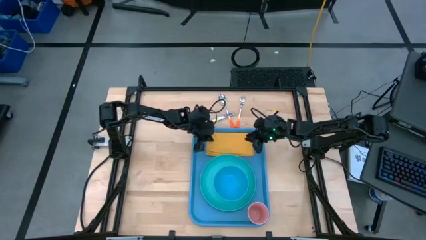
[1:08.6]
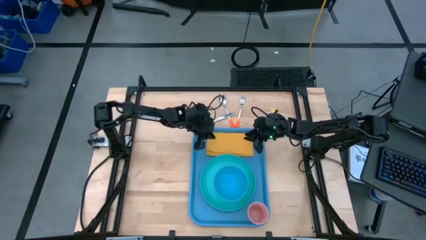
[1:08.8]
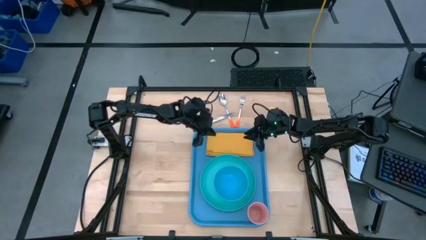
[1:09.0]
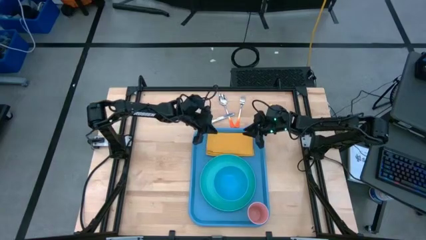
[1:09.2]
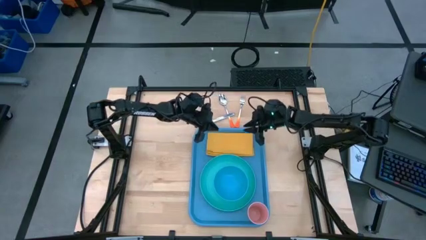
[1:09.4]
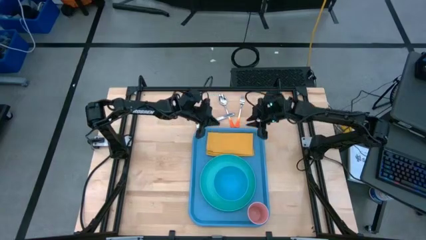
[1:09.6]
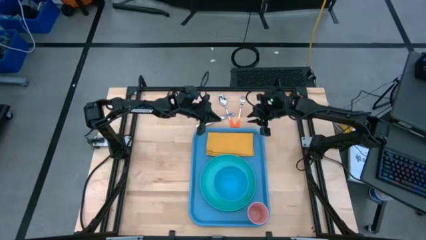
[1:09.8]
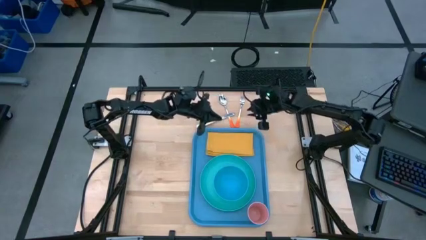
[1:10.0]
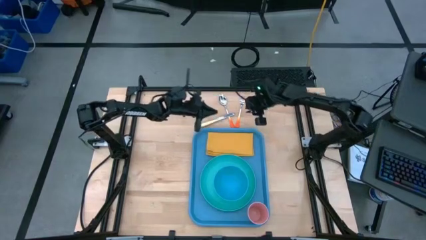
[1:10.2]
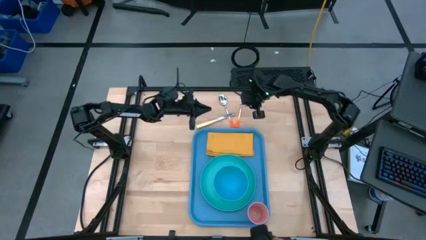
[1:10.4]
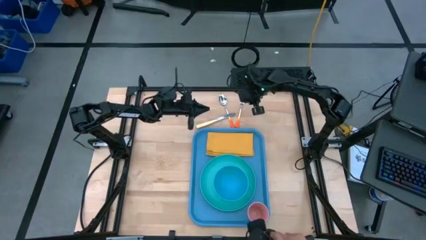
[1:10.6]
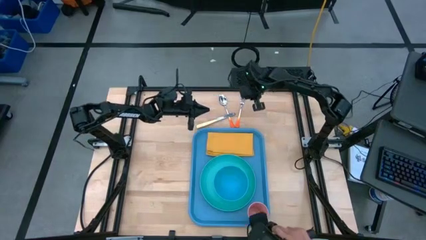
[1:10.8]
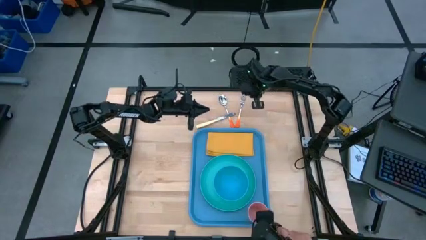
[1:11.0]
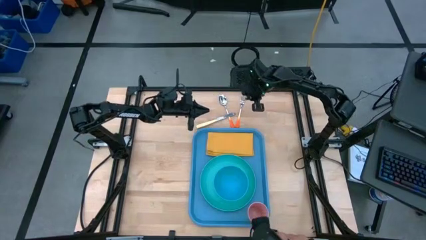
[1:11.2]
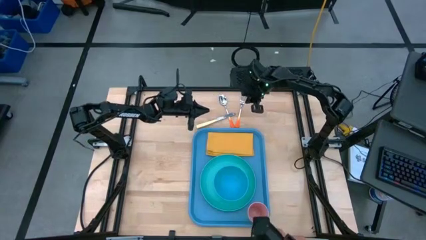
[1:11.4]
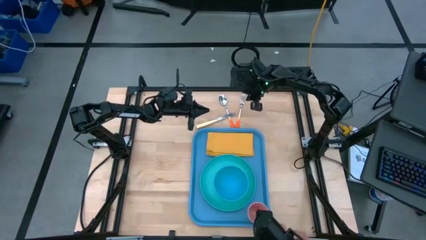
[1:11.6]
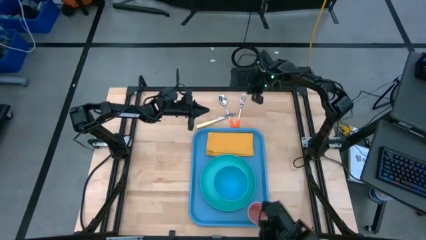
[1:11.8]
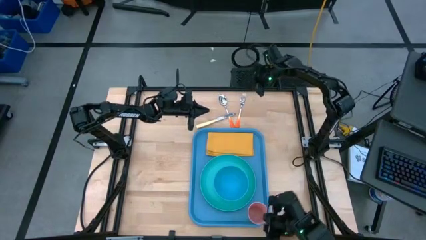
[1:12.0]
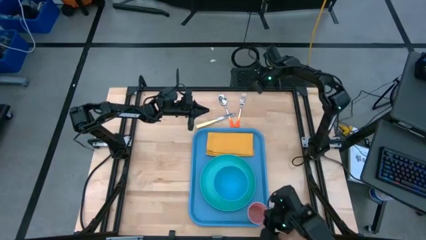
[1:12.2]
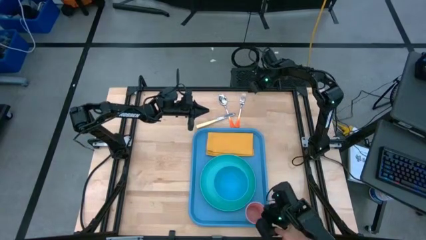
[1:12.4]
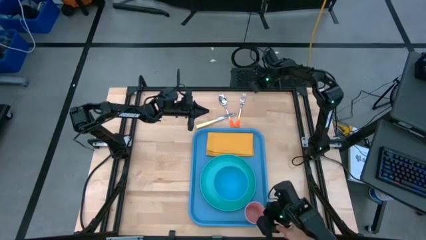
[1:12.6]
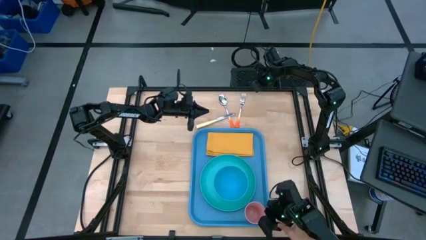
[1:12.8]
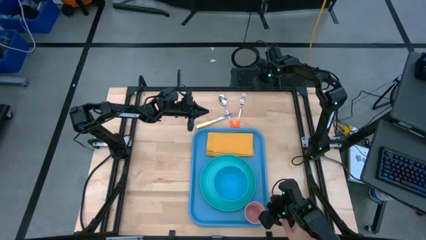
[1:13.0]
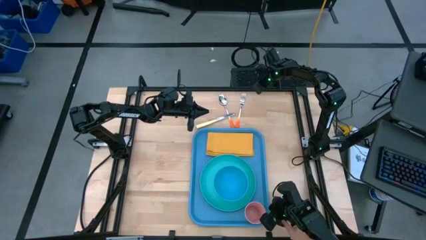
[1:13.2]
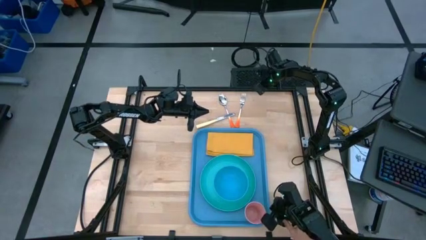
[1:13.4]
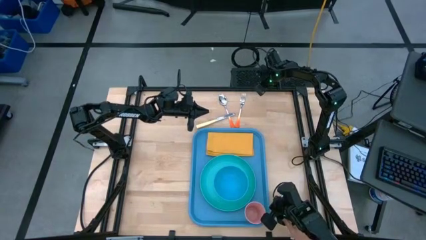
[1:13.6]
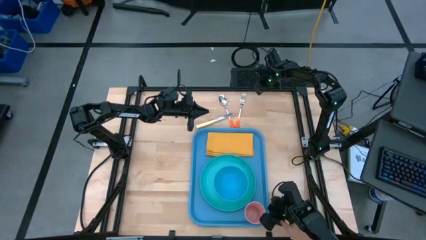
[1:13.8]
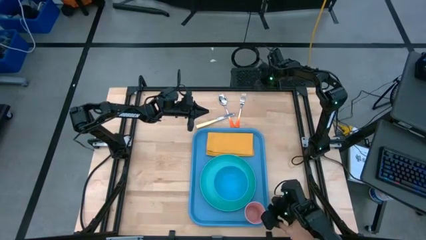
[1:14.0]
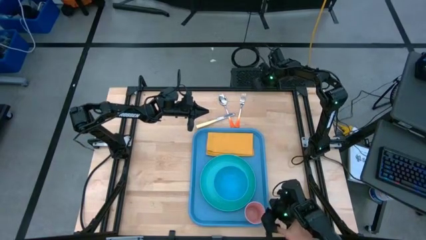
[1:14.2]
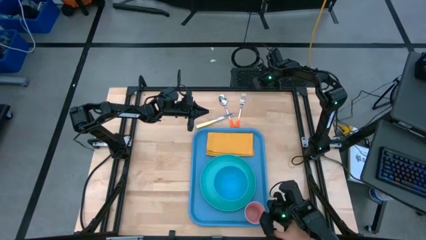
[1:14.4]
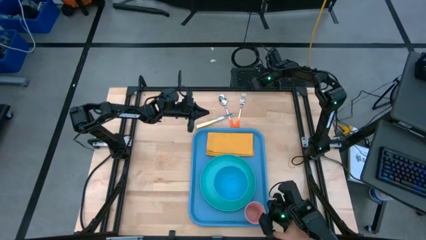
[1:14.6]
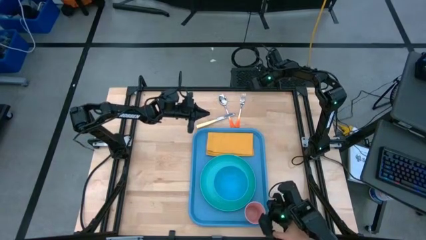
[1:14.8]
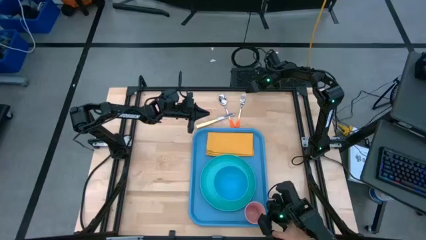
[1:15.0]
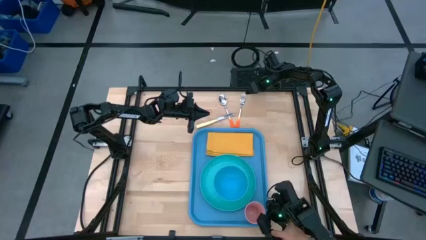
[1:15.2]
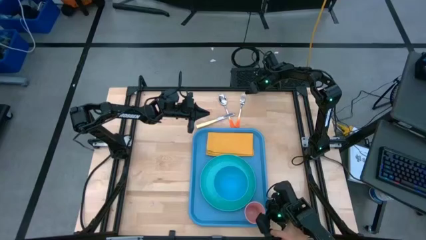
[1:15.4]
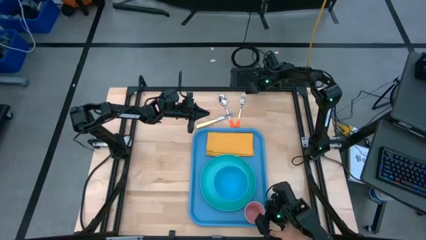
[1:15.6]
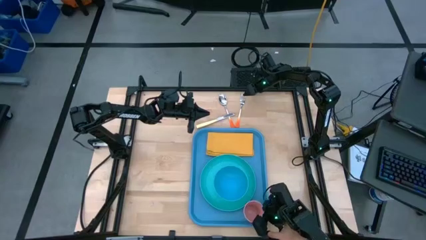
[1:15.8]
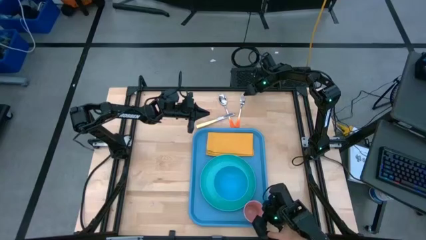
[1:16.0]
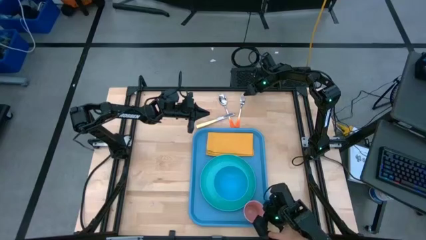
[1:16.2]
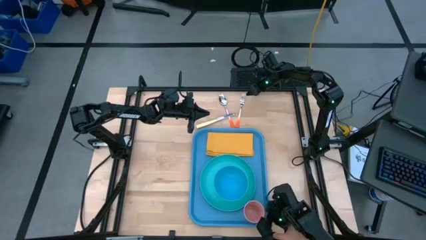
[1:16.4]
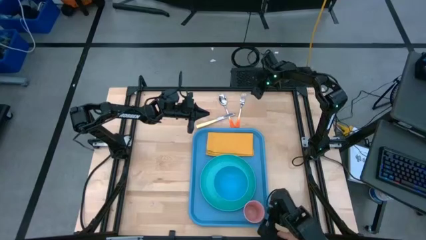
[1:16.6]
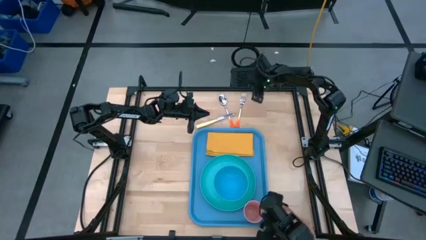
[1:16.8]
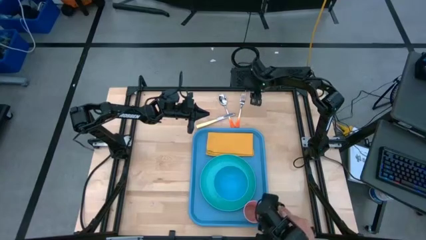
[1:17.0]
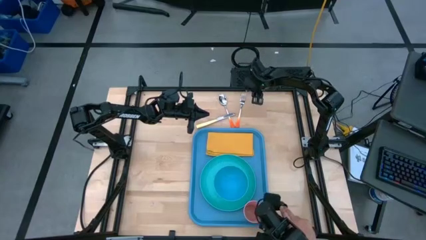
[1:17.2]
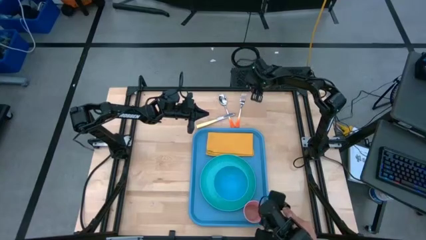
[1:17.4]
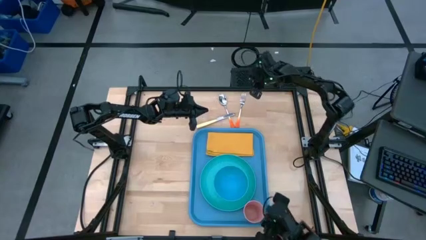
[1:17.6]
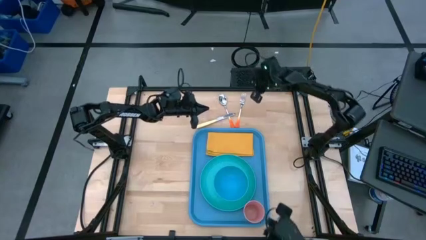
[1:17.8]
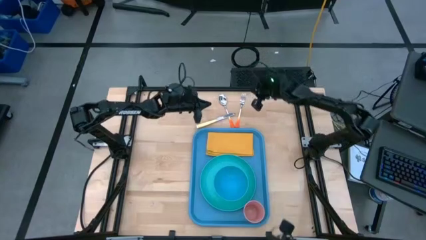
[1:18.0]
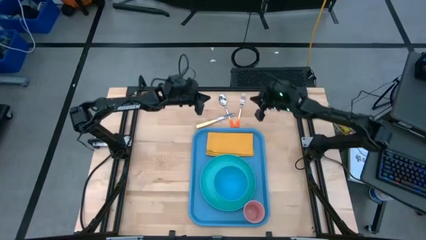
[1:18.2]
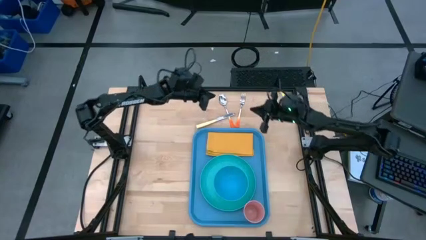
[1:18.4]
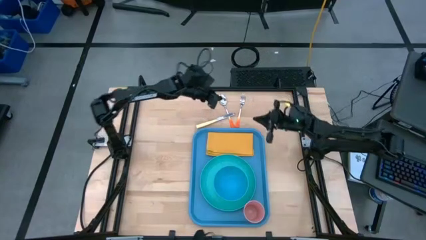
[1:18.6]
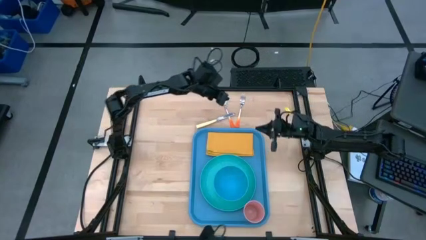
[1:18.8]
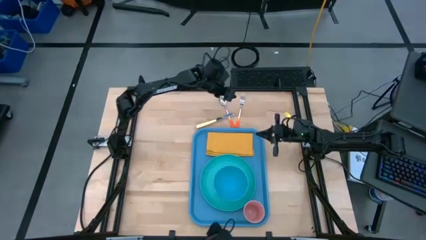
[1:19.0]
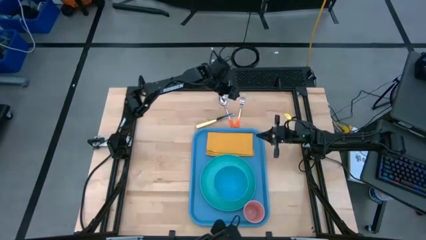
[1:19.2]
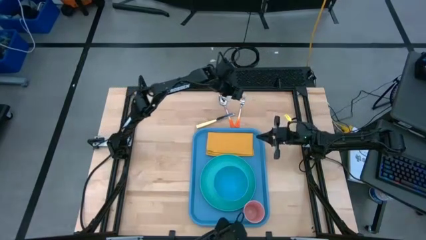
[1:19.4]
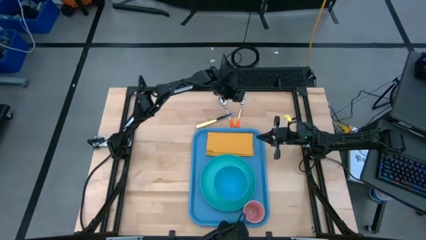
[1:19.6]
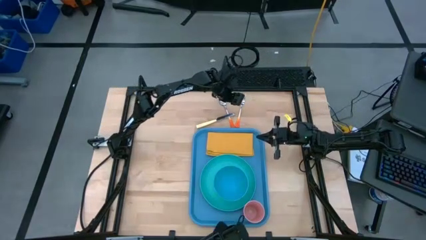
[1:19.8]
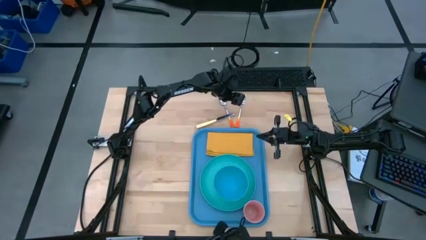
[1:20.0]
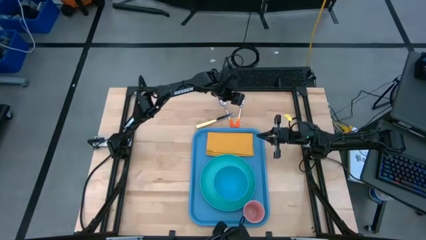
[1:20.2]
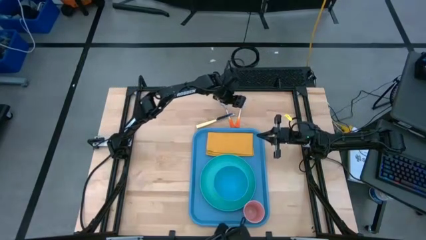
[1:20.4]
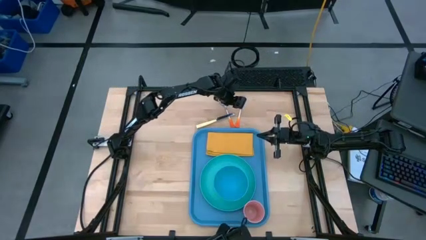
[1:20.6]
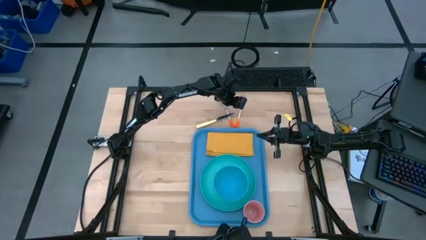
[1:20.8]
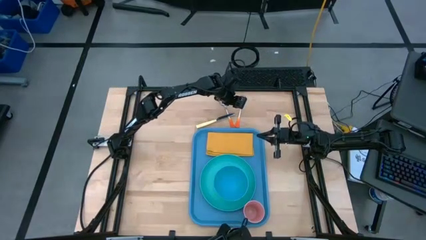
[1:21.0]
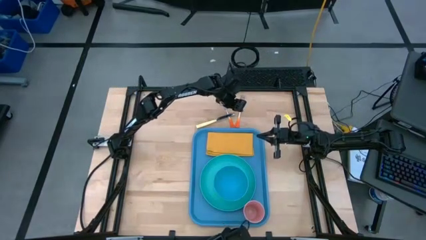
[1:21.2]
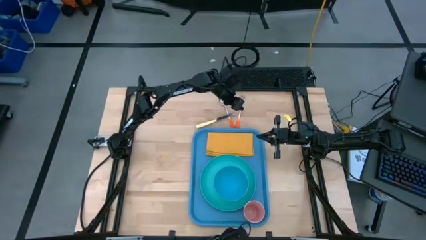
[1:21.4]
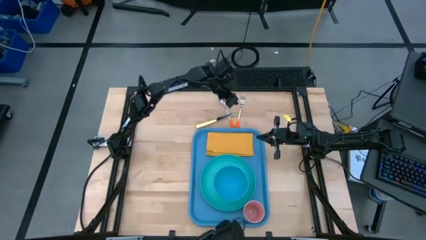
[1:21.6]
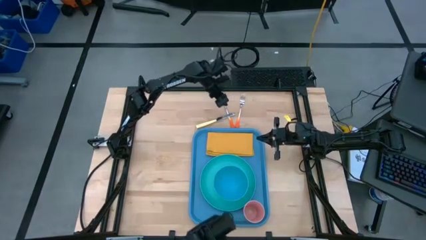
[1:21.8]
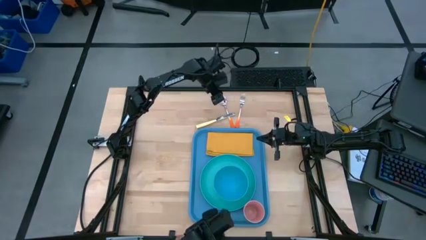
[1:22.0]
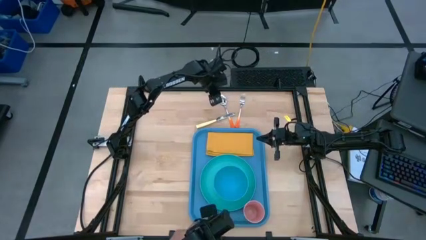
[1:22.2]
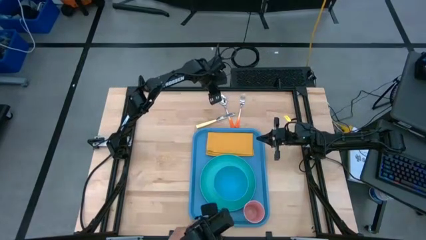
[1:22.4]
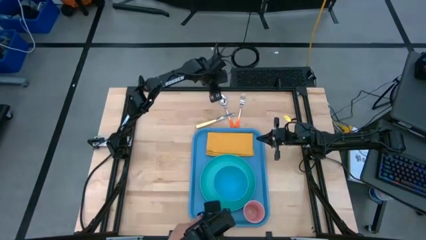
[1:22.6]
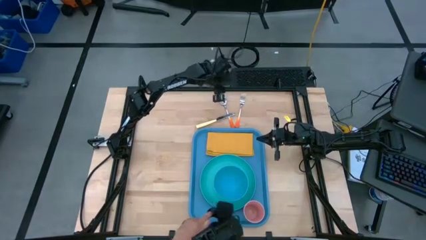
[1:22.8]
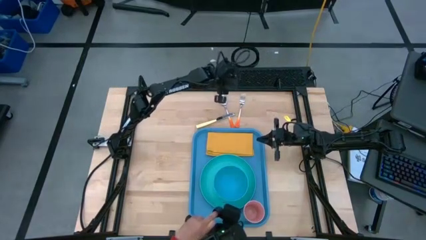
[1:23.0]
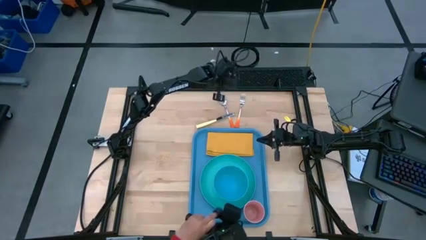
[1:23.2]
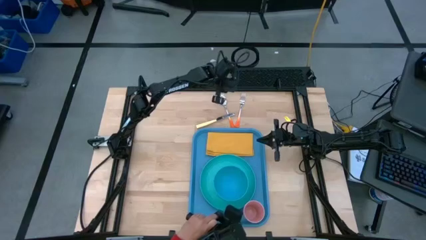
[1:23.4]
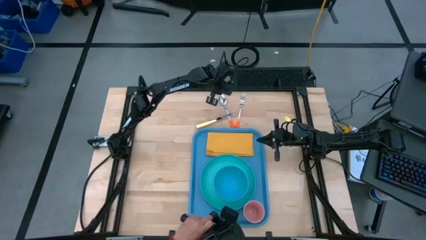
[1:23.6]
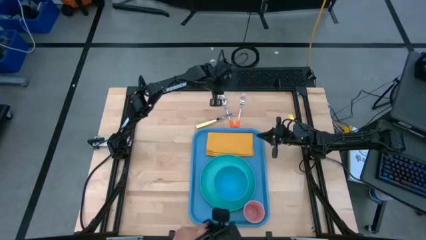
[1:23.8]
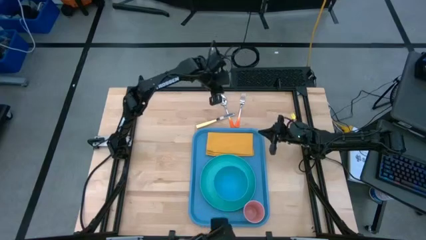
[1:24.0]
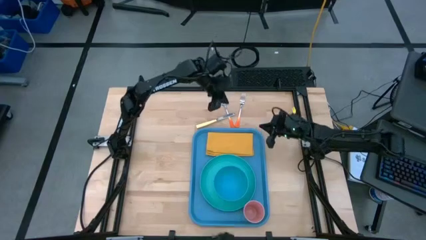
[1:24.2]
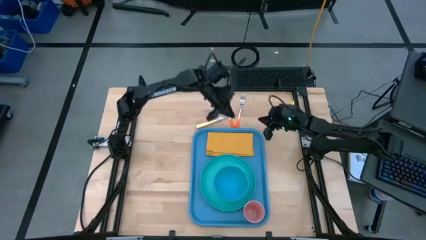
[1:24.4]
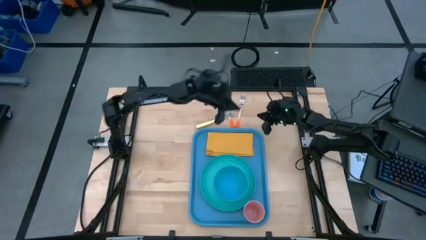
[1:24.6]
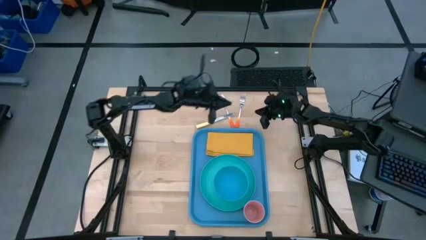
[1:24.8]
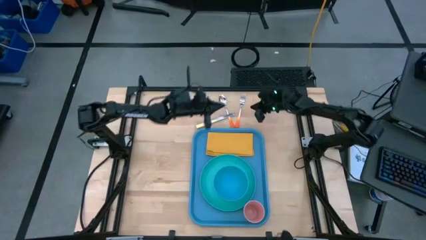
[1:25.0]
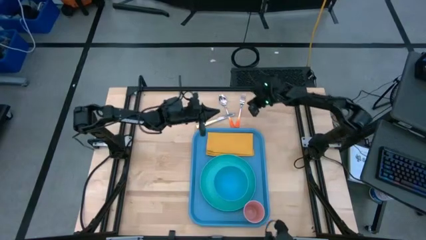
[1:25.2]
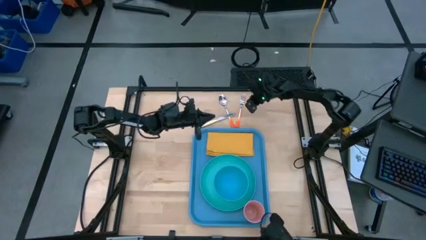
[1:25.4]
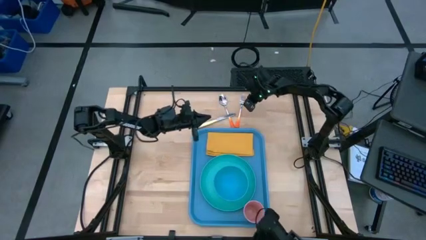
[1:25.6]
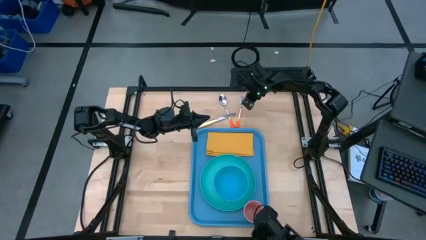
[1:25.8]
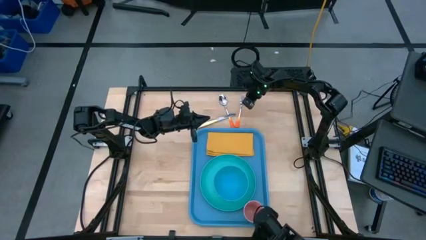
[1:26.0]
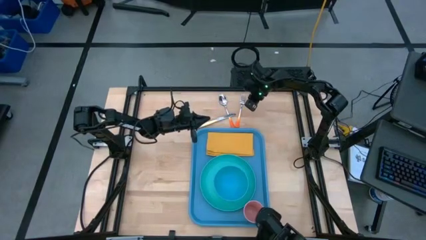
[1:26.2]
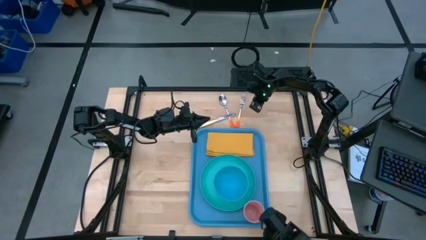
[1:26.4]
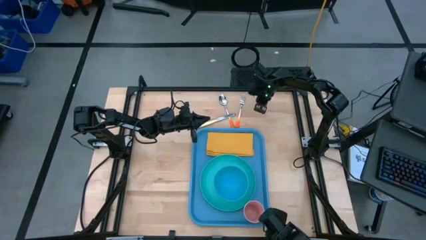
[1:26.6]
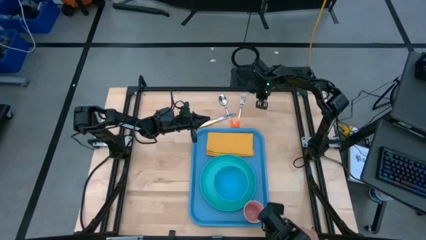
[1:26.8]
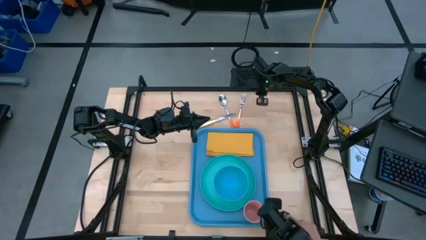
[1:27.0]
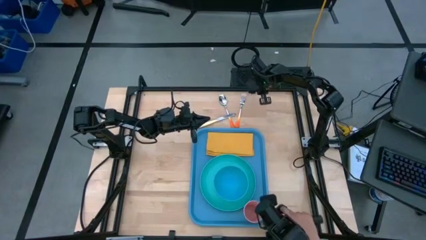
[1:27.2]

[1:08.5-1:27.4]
Task: Set up tray
Put the orange fork on the yellow napkin on the blue serving tray
